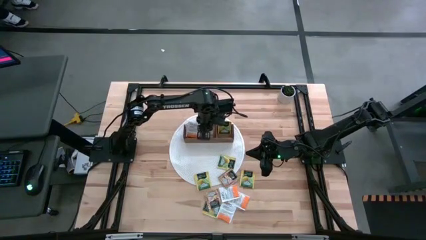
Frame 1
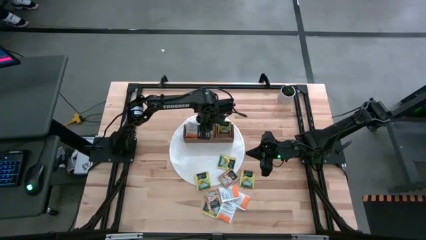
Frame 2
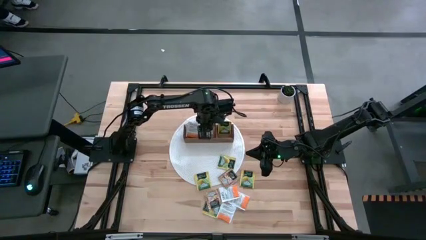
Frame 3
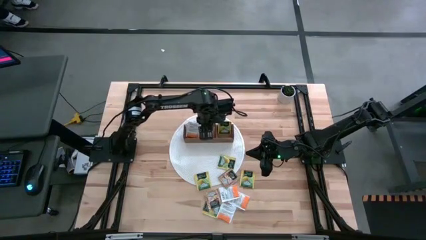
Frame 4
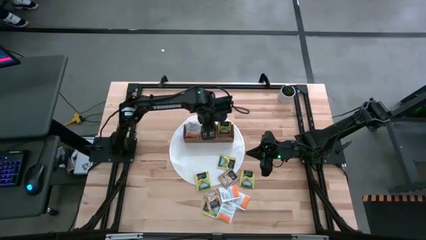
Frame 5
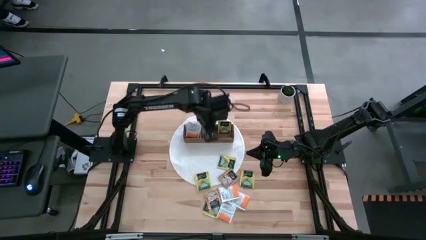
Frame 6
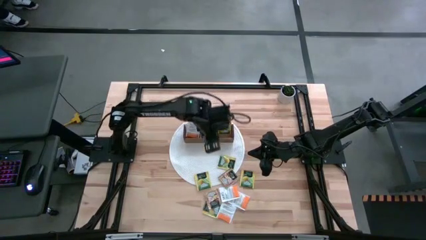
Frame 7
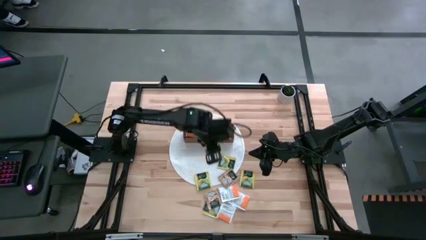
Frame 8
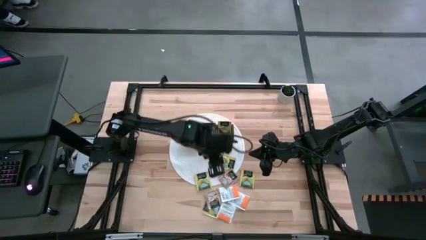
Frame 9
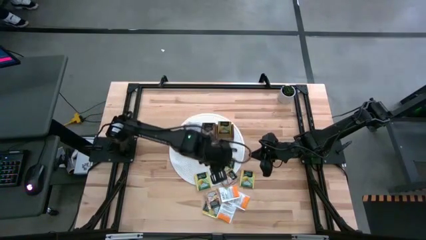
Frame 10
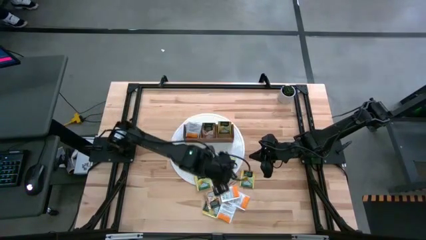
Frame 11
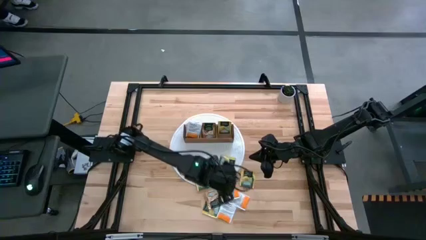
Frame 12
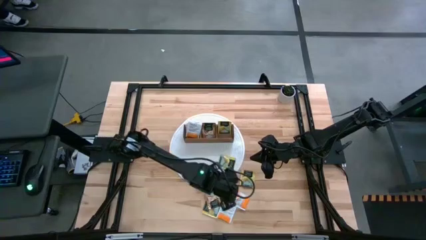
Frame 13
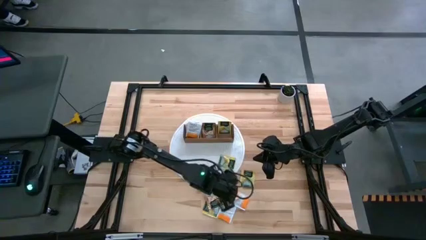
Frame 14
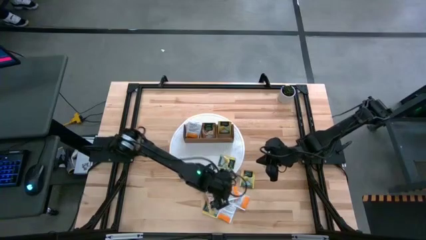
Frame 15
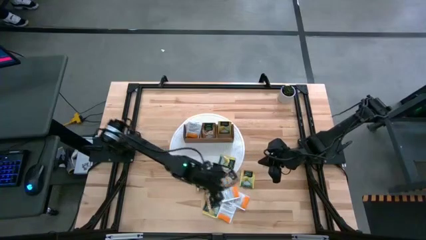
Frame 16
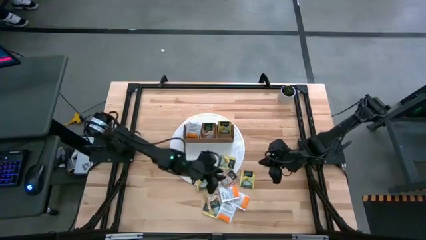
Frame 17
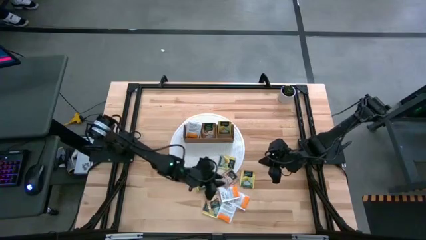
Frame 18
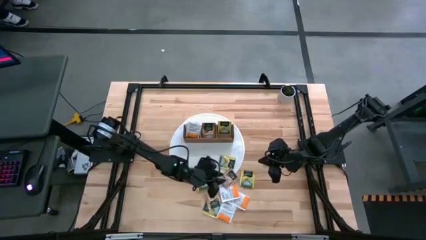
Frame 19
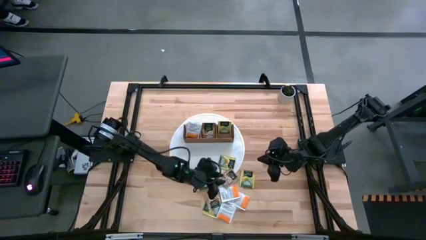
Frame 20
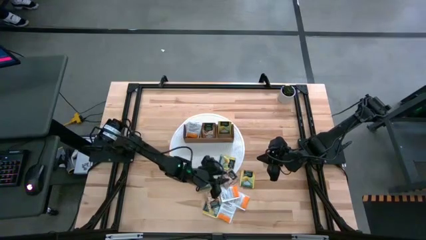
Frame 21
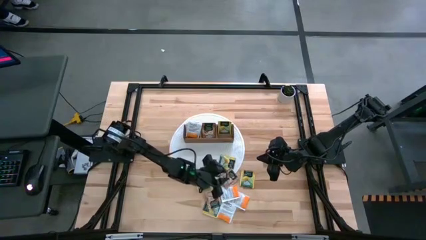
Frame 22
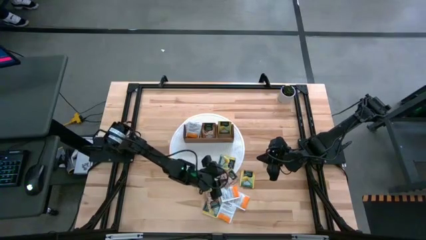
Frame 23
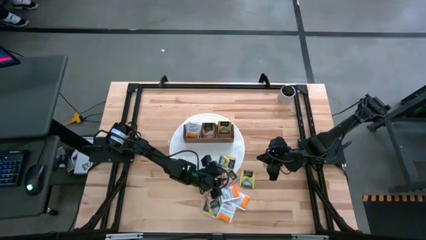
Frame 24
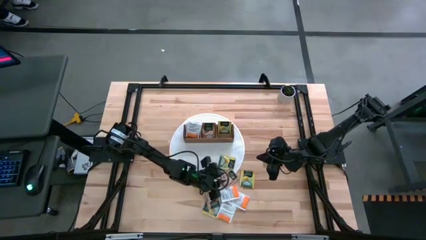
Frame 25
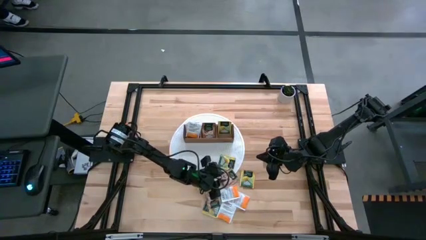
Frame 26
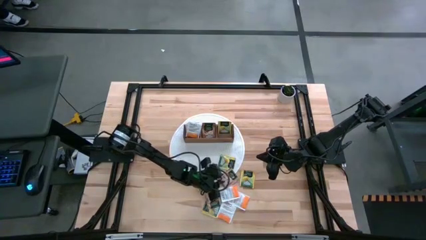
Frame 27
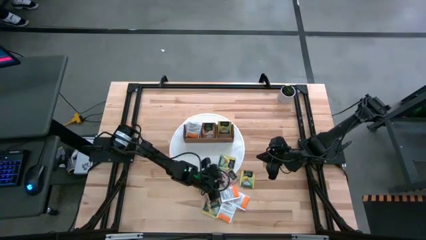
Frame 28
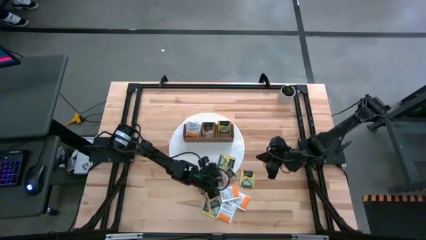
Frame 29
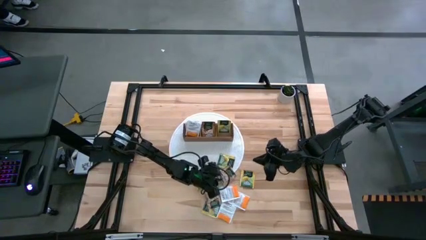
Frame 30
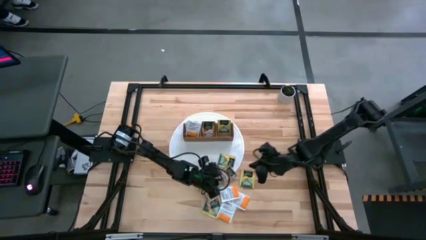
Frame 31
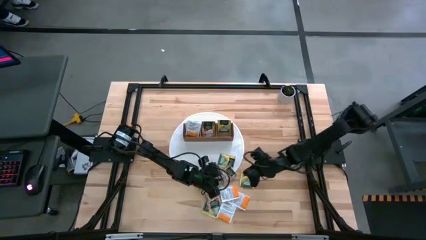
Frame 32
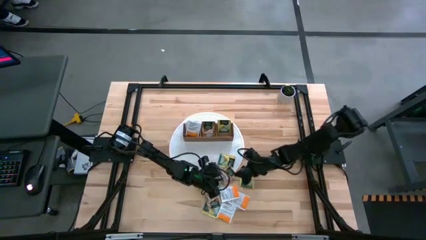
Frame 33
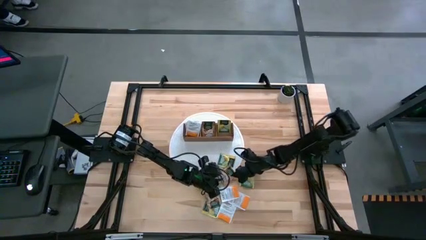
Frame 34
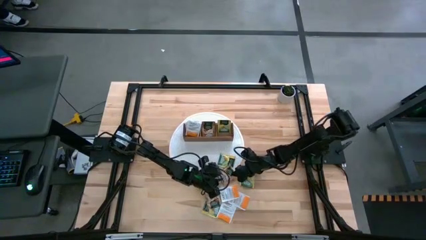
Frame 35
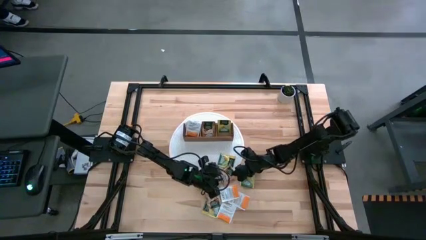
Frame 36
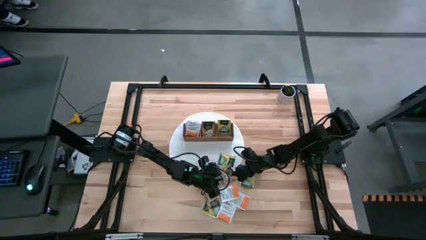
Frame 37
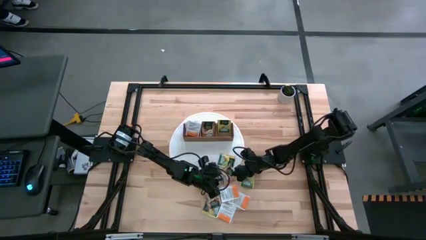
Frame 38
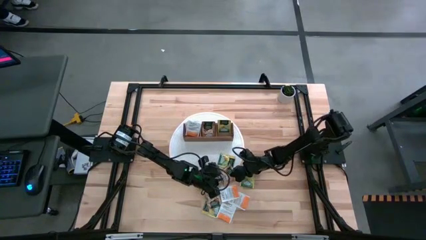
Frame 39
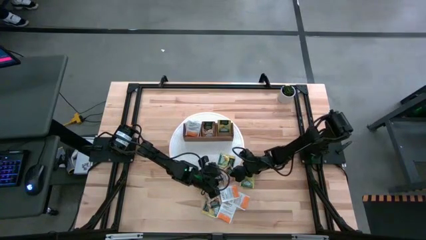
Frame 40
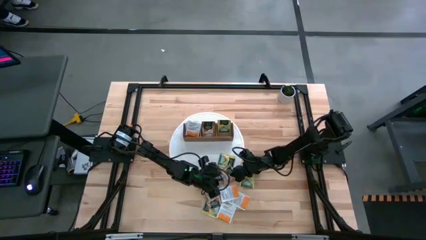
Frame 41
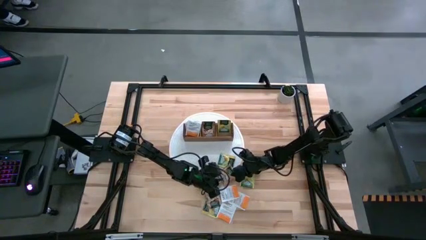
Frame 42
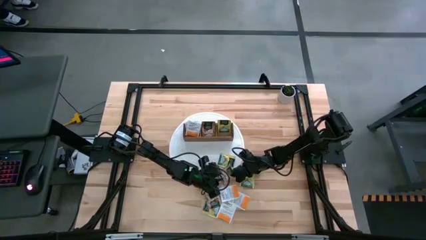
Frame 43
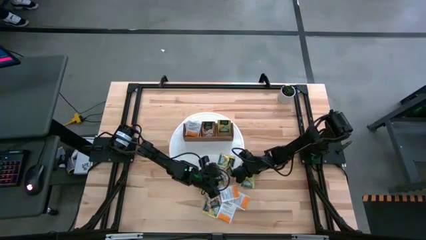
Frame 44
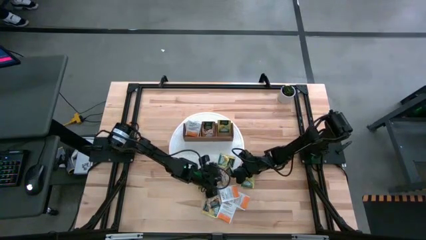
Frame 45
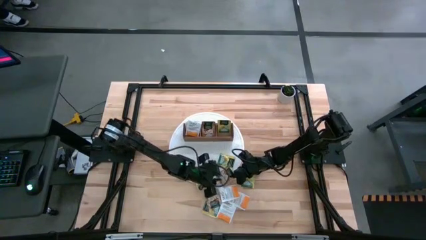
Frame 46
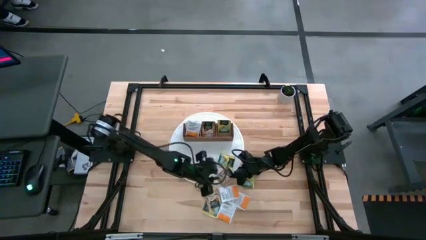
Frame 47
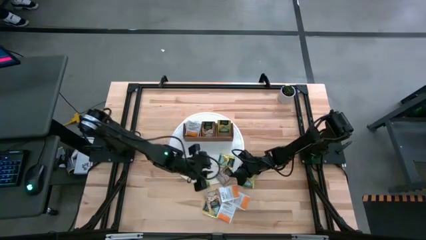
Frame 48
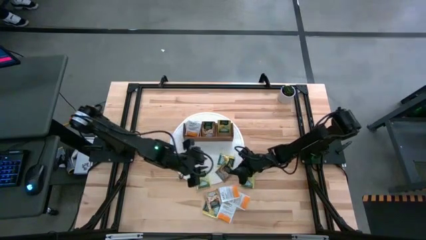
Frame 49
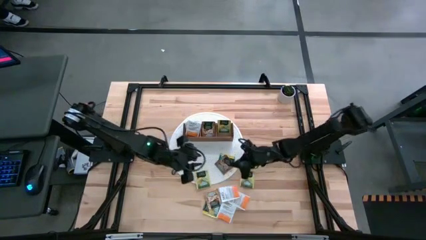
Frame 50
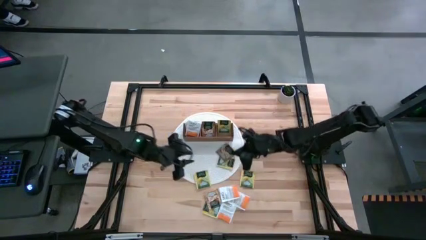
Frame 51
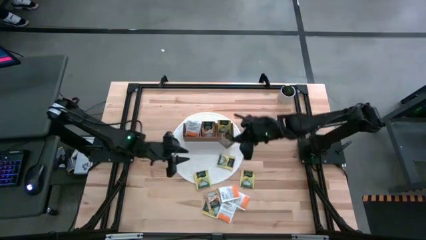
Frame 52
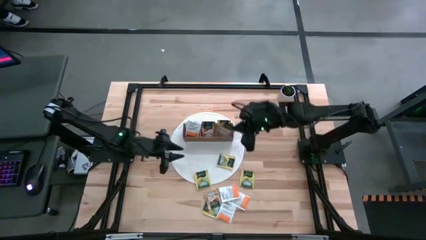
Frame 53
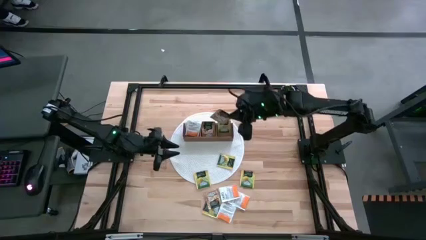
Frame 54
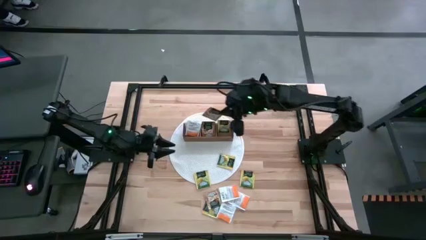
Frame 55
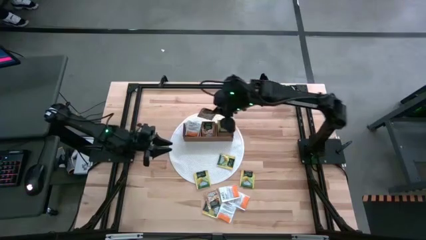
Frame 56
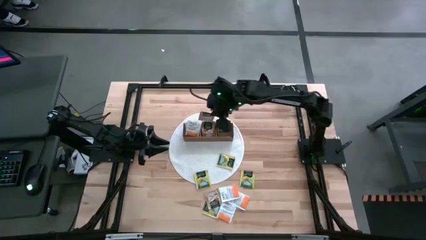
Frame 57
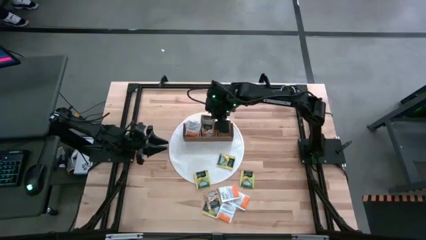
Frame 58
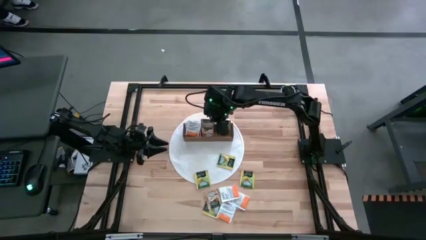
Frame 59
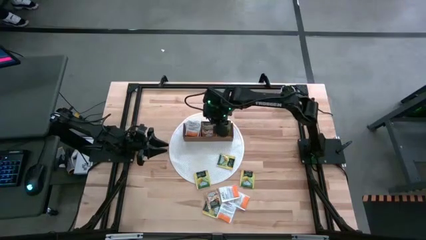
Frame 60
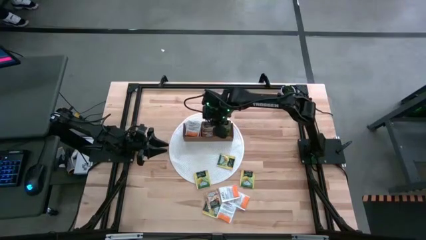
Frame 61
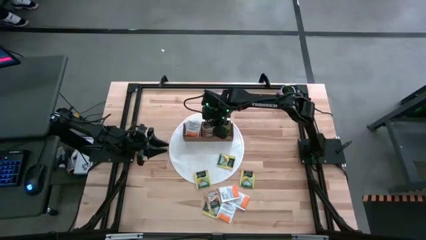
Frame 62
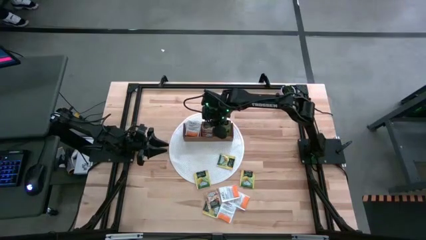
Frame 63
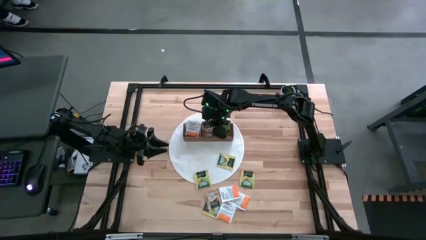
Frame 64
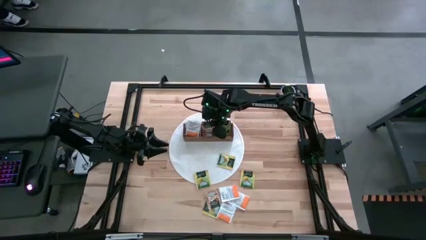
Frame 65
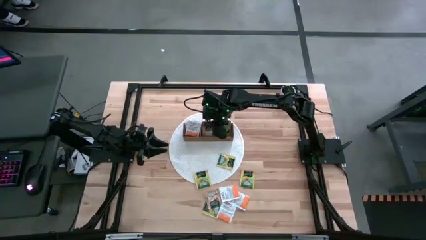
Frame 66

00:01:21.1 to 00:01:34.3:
Task: Pick & Place Tea
Put the brown tea bag into the middle section of the wooden organizer

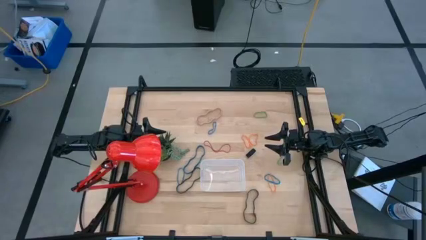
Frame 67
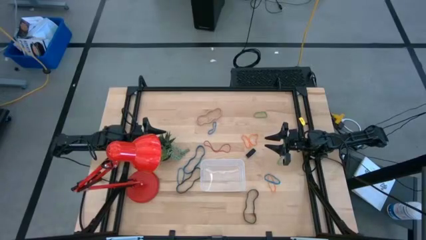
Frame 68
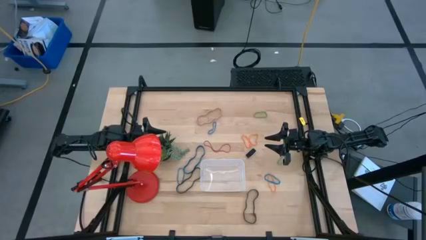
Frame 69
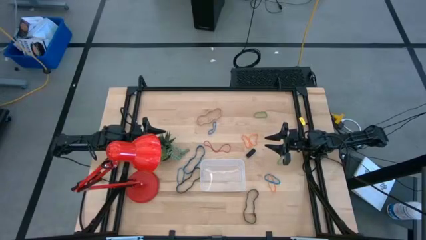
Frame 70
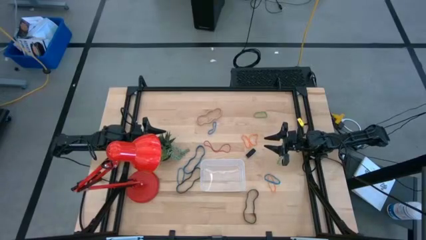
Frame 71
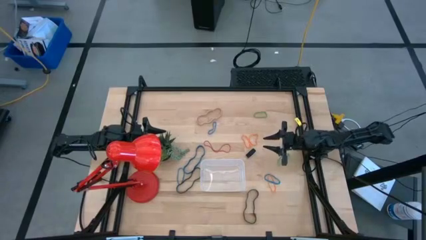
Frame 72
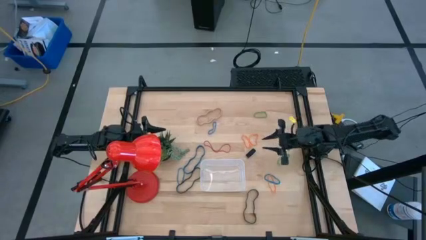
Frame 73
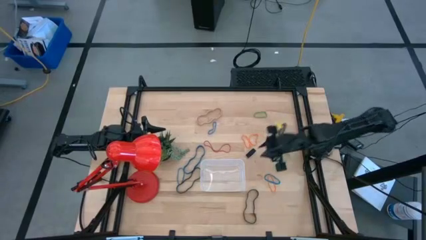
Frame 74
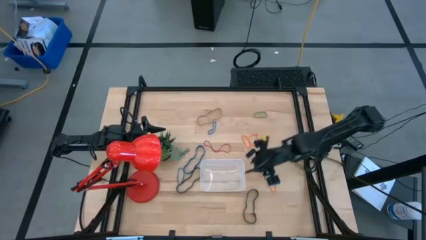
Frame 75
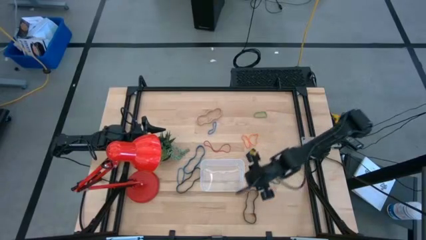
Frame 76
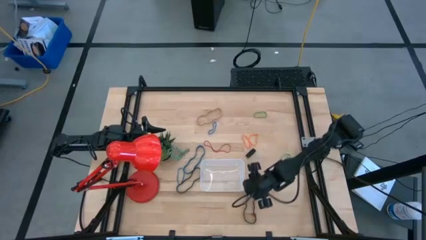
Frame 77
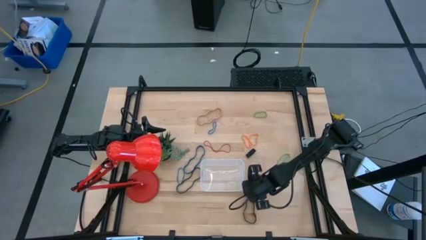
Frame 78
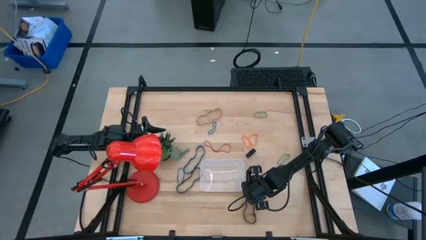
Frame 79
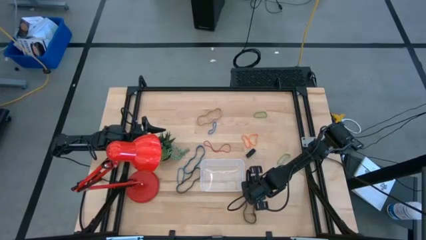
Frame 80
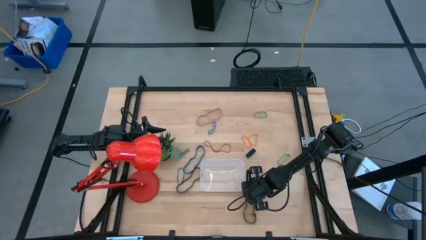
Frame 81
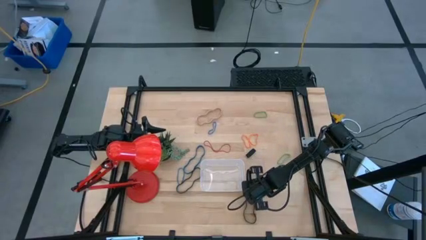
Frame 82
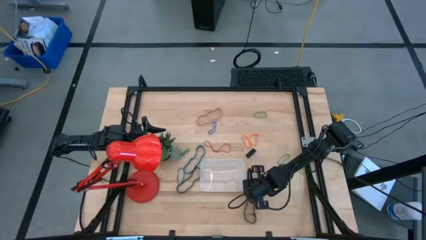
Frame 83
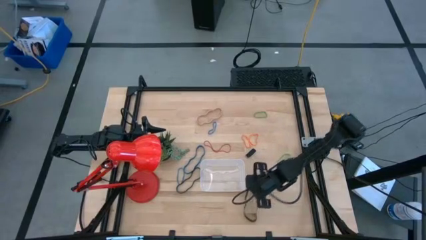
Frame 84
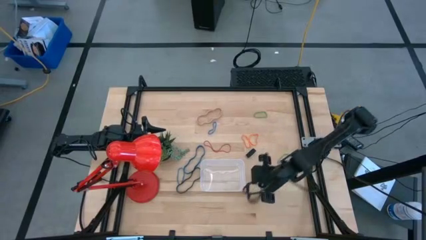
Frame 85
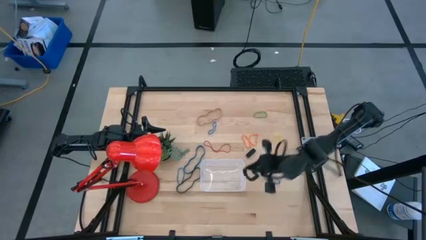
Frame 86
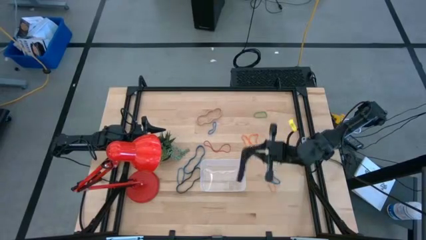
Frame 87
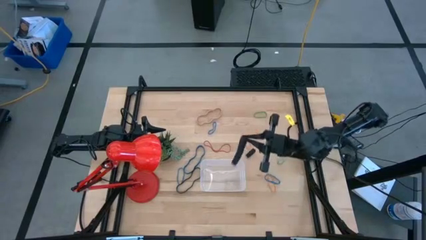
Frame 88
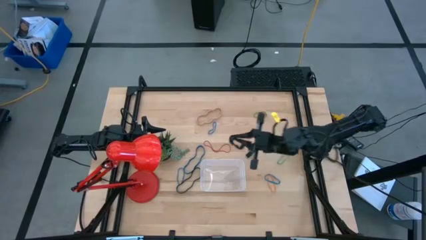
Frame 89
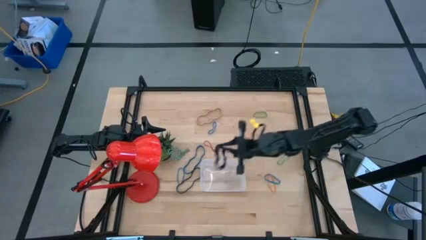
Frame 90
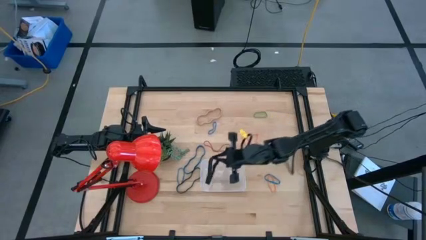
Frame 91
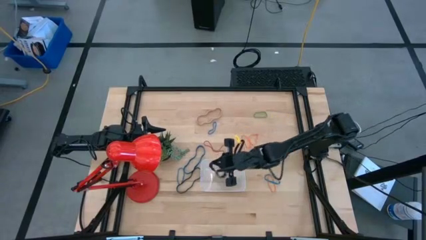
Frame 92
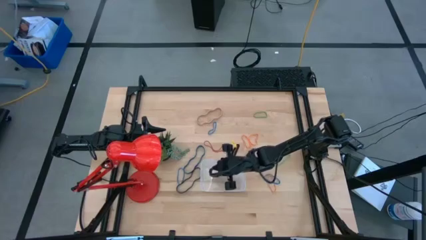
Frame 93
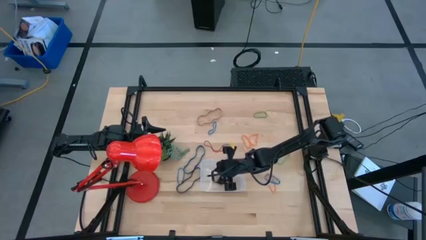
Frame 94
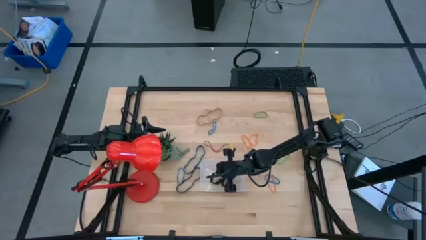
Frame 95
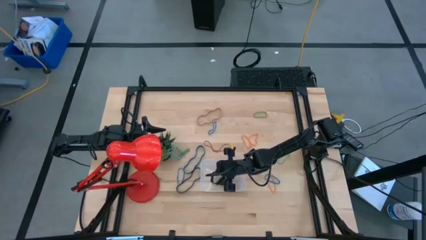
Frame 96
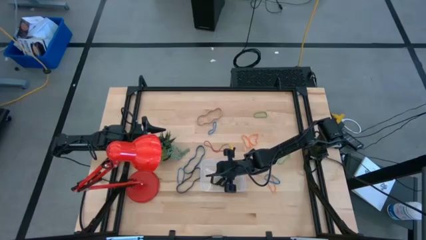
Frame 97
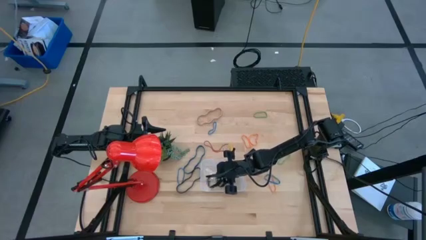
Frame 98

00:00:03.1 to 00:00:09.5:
Task: Pick and place rubber bands into bin
Put the bottom right black rubber band into the bin
